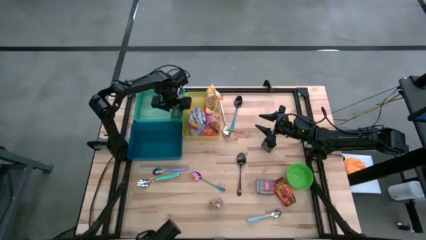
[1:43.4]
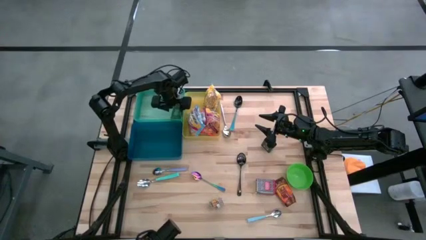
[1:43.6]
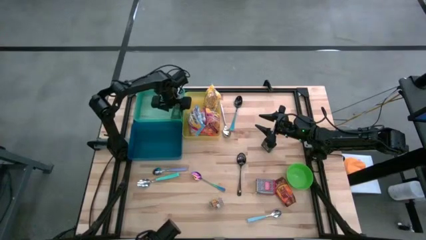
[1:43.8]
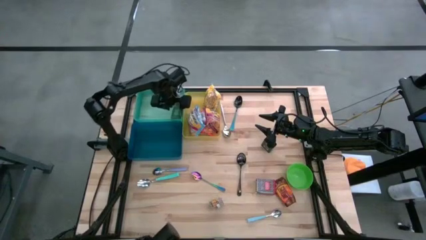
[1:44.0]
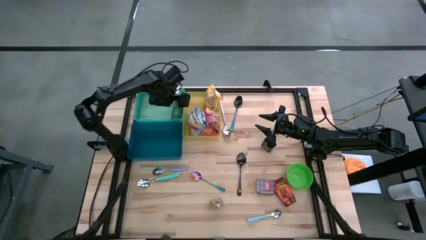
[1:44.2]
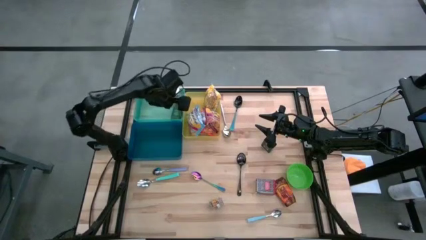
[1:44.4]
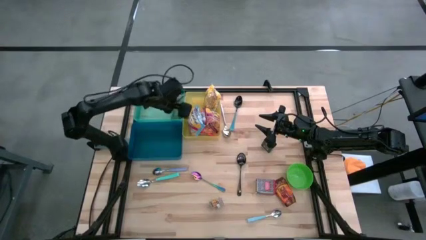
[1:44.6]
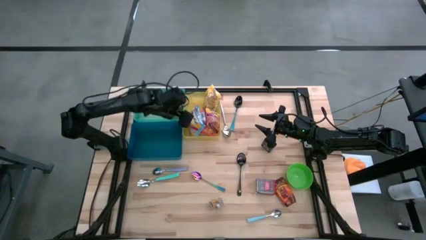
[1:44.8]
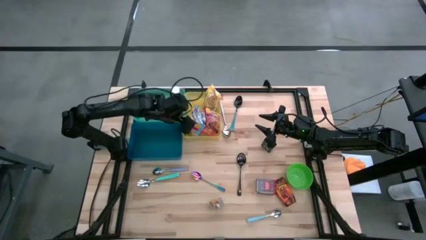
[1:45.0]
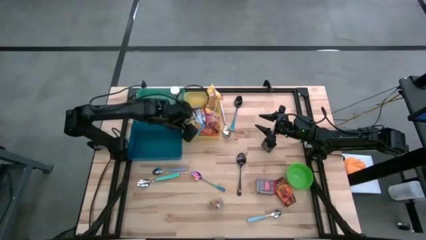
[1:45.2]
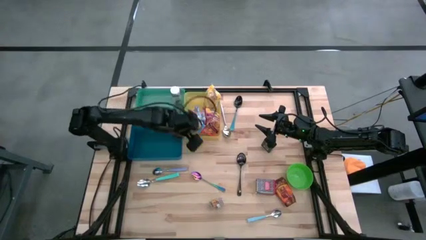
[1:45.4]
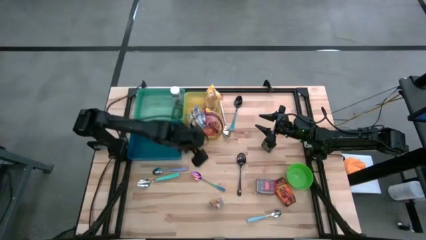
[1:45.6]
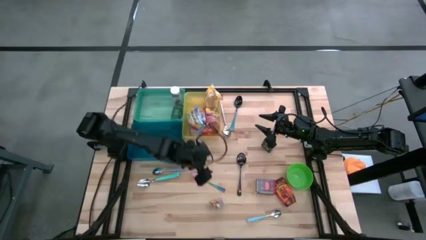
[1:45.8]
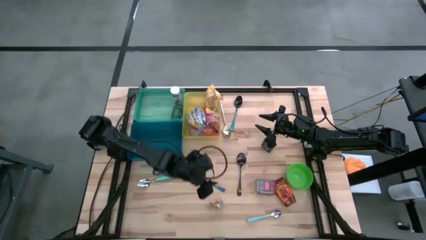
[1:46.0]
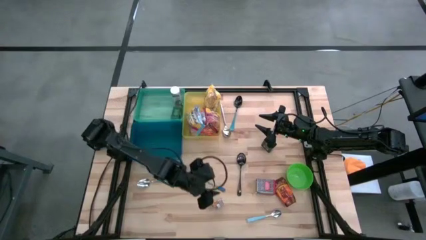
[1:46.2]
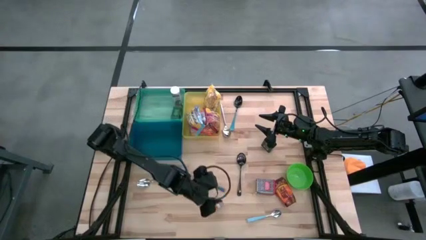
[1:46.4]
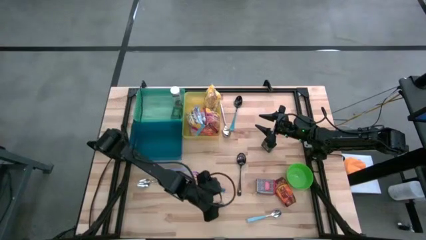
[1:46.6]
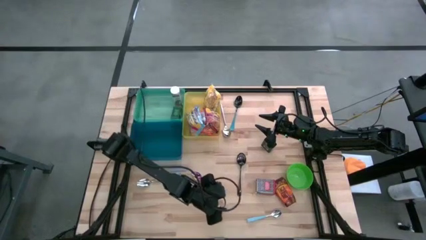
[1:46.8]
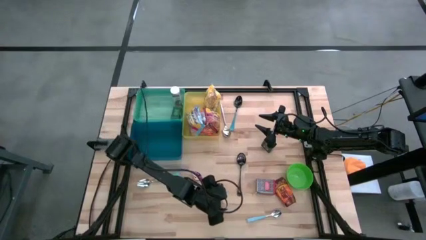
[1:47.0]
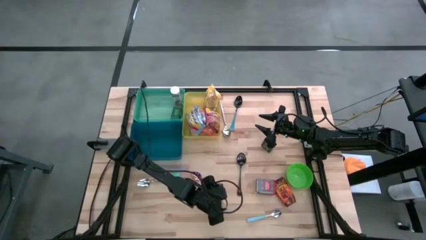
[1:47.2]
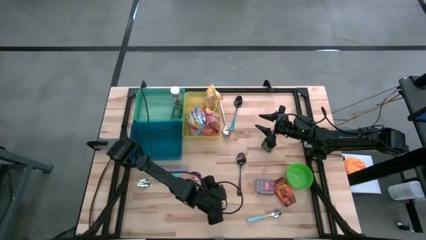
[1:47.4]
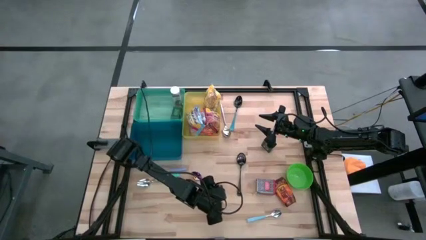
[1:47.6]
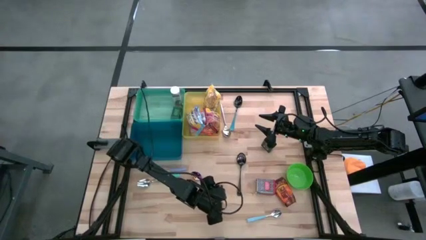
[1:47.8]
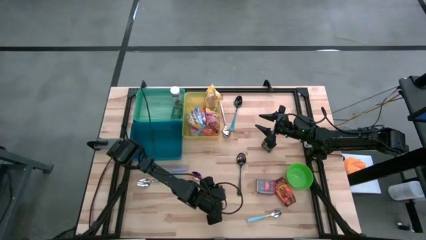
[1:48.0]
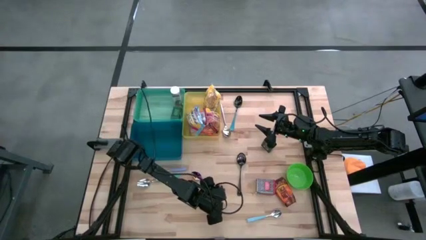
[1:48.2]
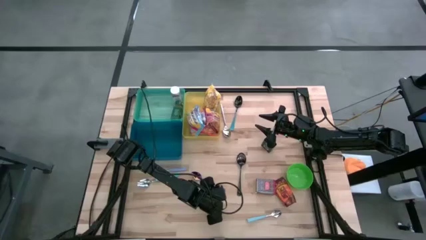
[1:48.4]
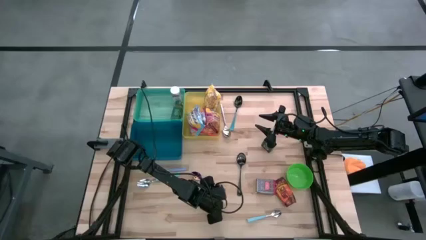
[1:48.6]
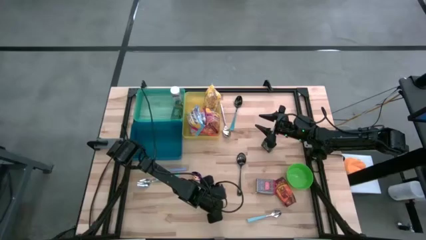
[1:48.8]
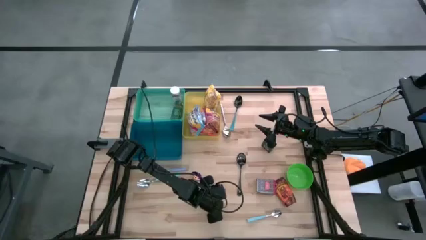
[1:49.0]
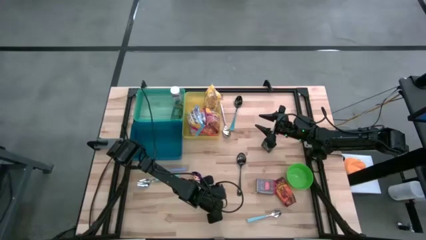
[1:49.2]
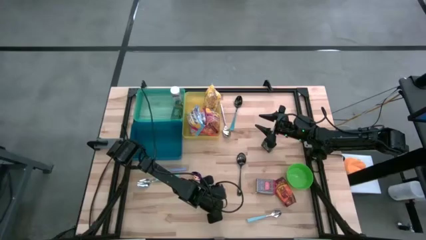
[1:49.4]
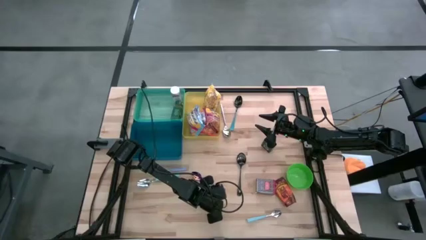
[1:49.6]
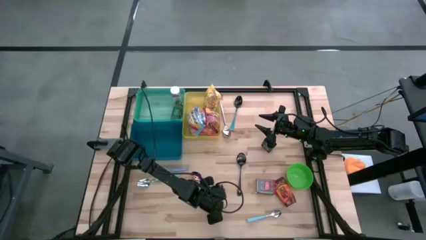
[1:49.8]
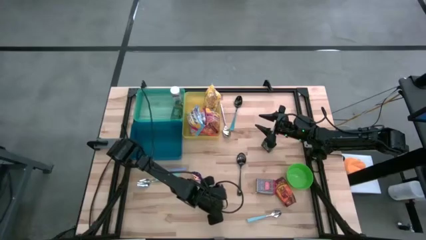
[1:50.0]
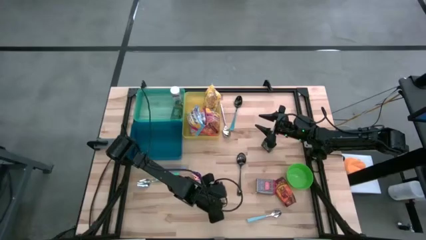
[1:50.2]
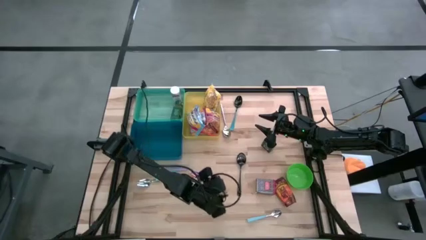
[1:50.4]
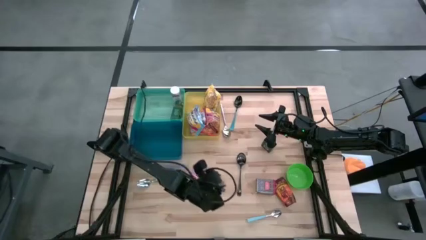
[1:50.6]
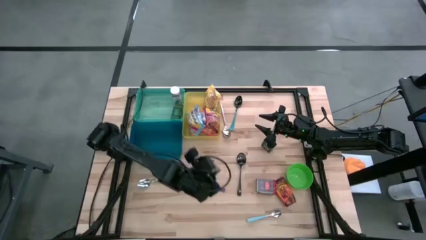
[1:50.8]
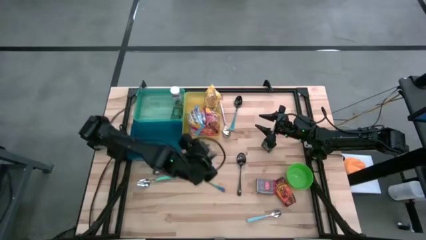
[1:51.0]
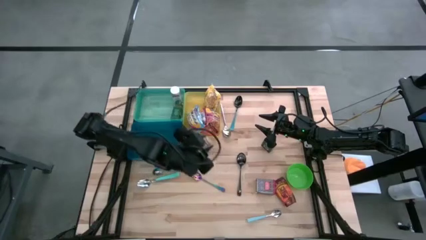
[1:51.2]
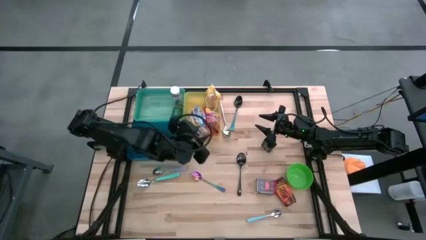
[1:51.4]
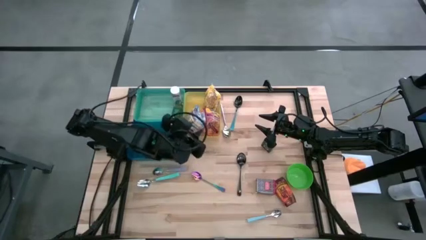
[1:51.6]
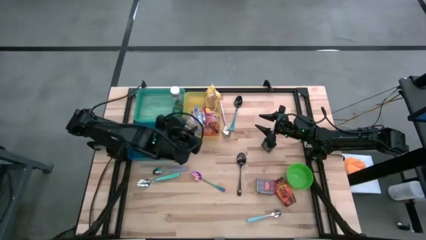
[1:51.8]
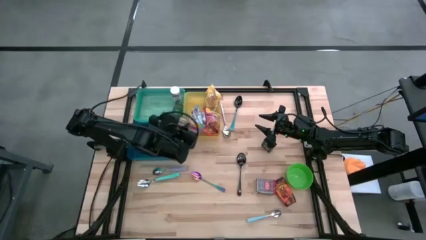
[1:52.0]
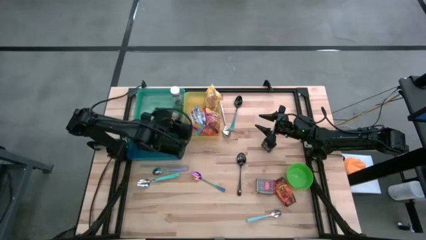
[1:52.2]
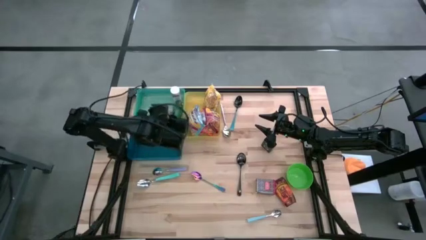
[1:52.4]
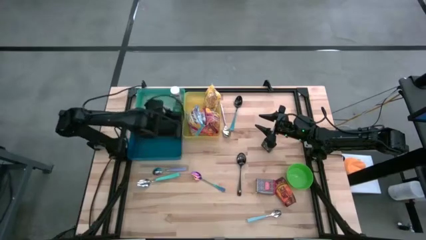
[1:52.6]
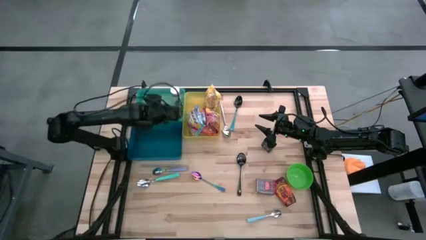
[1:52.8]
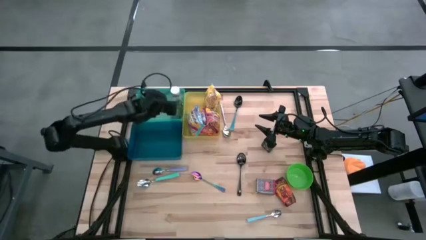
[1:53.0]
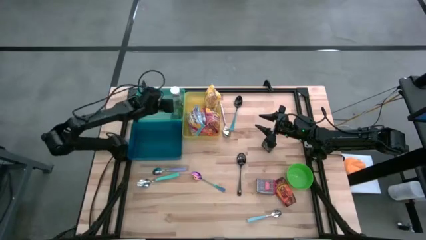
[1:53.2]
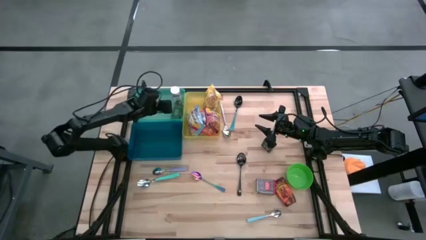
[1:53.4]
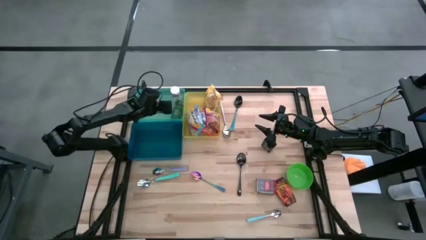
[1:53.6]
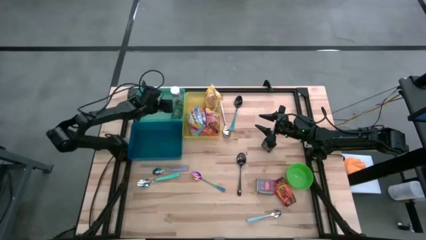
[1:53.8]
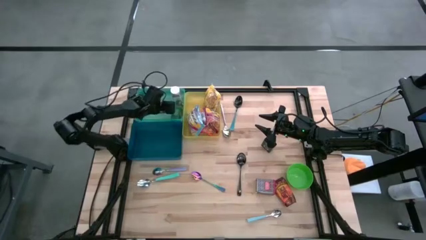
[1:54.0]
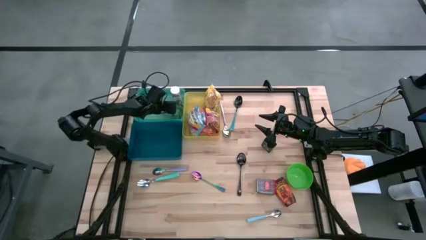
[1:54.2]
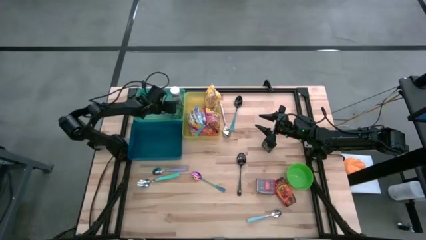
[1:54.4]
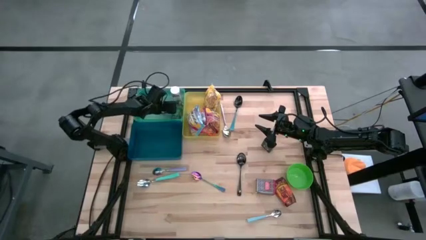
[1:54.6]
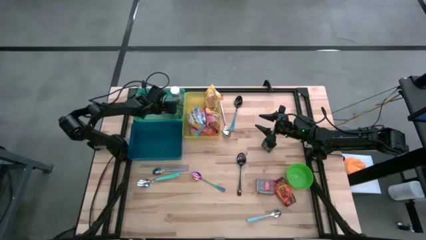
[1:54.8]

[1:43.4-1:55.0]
Put the brown spice bottle into the green bin
